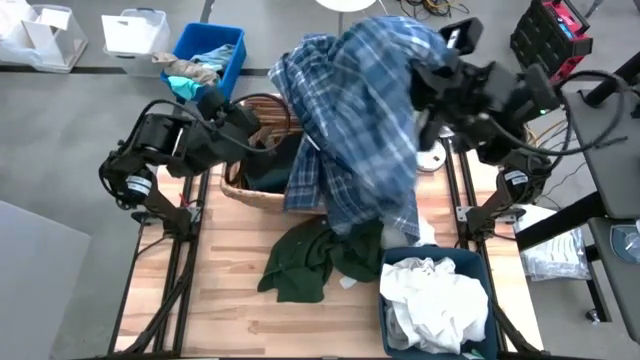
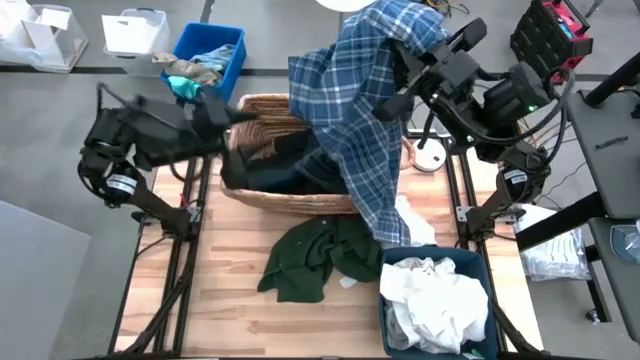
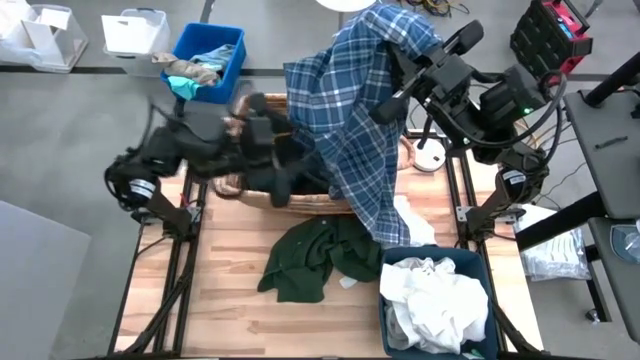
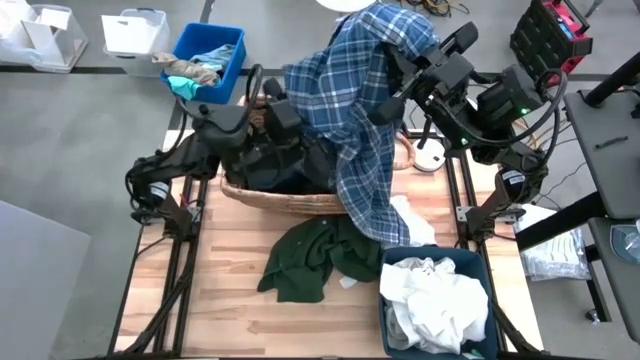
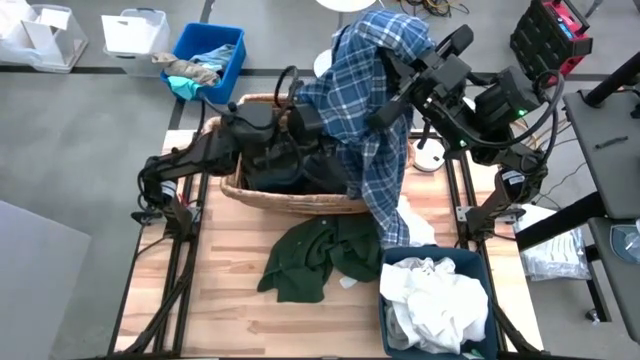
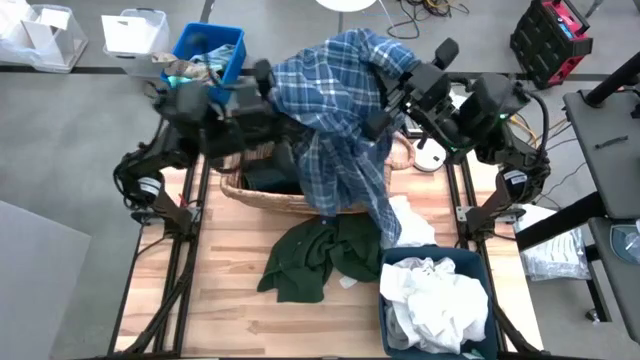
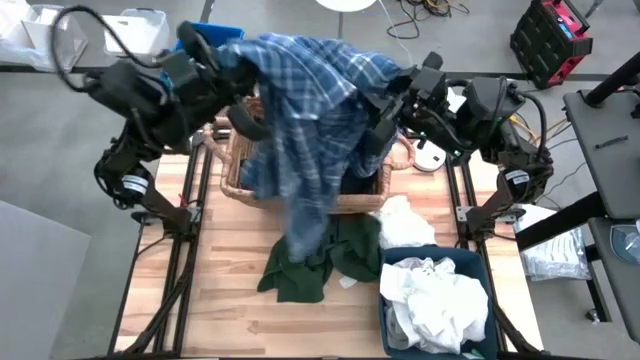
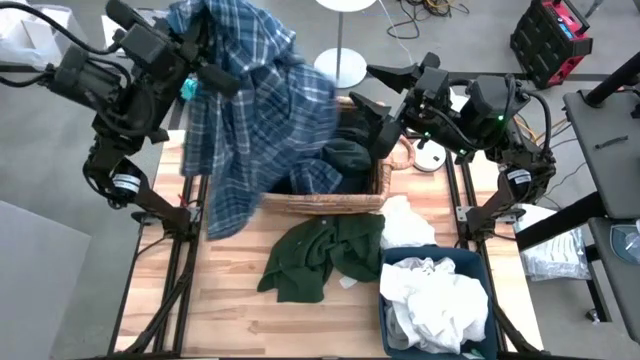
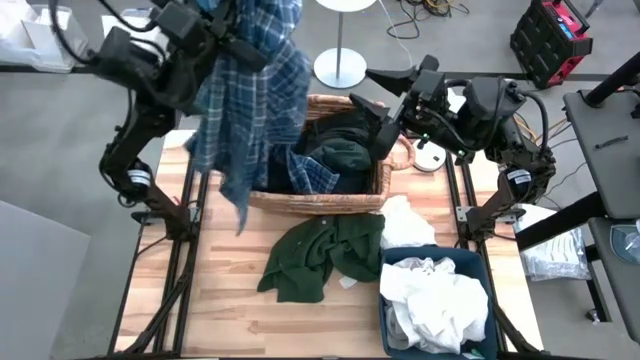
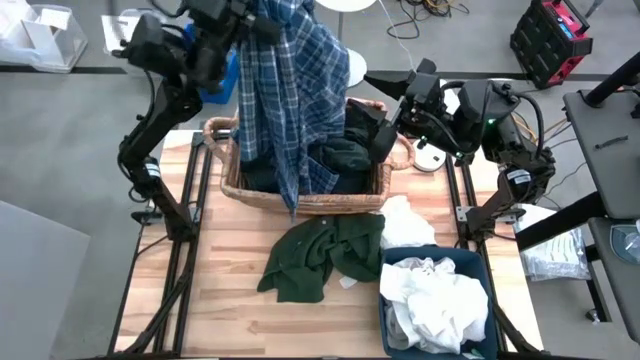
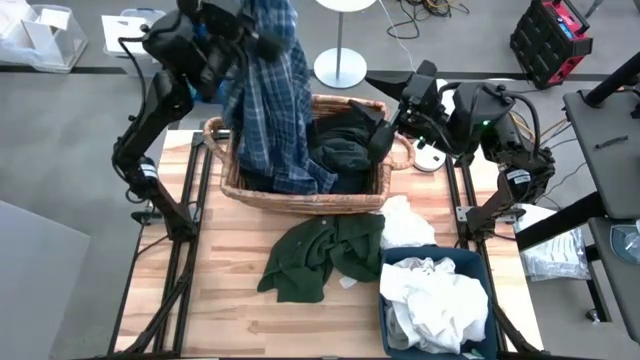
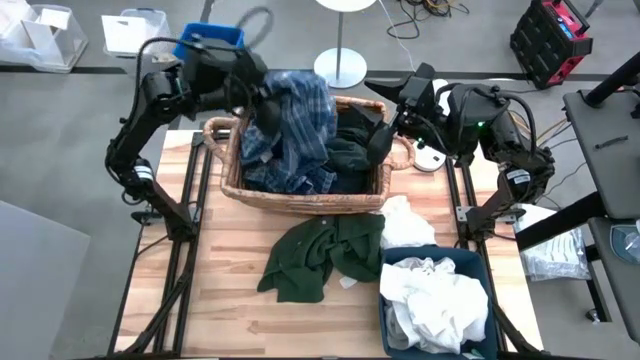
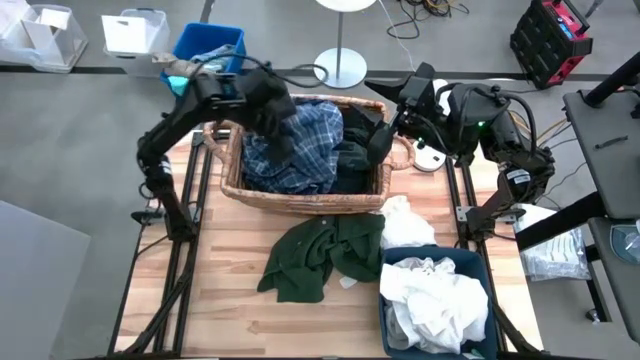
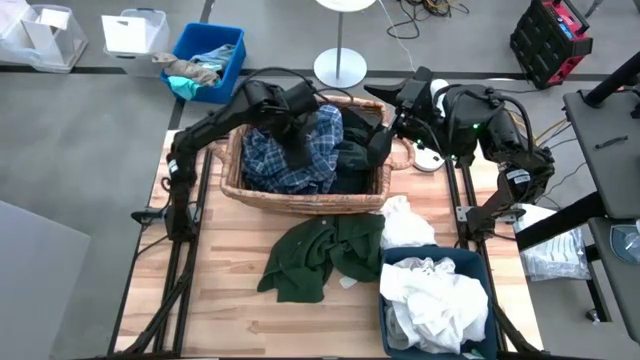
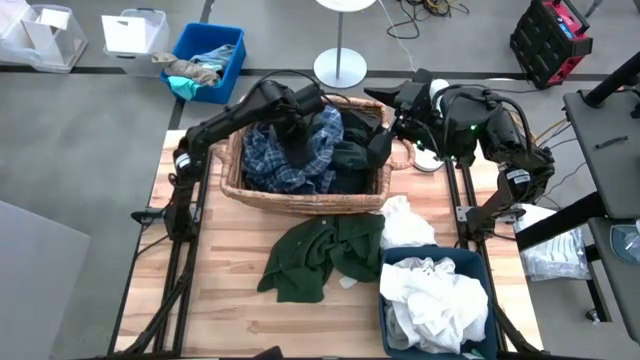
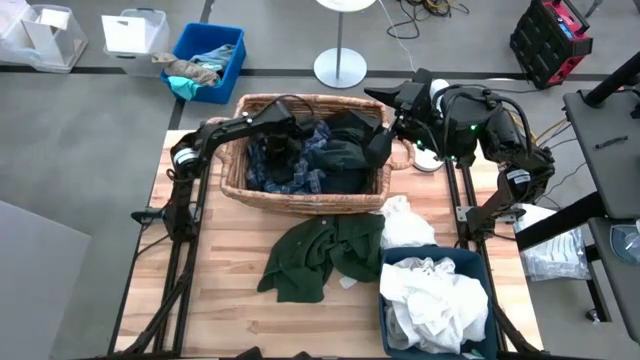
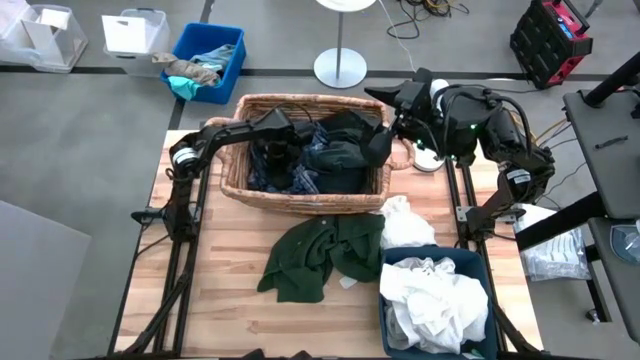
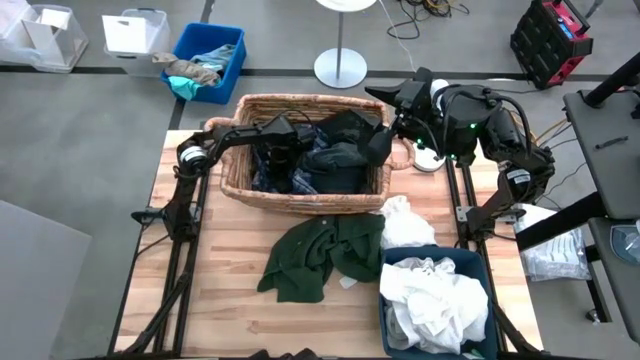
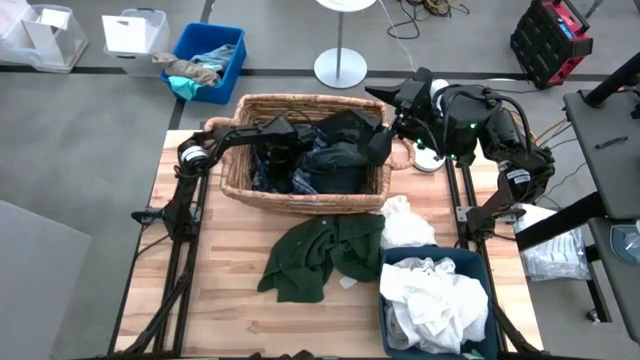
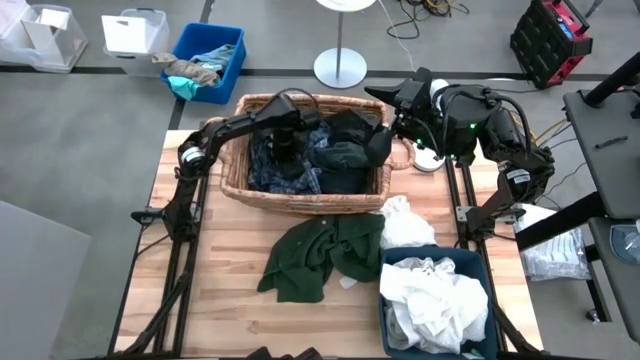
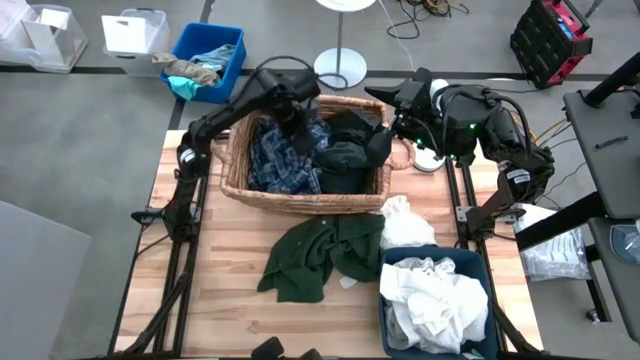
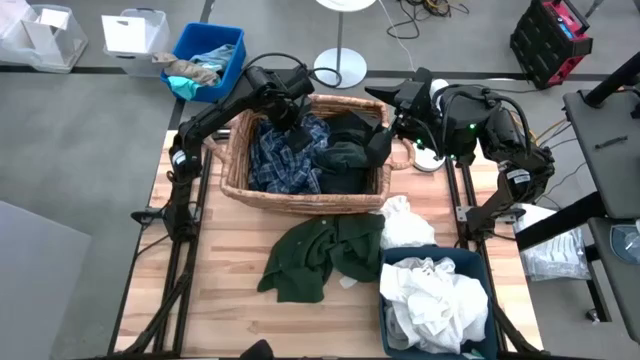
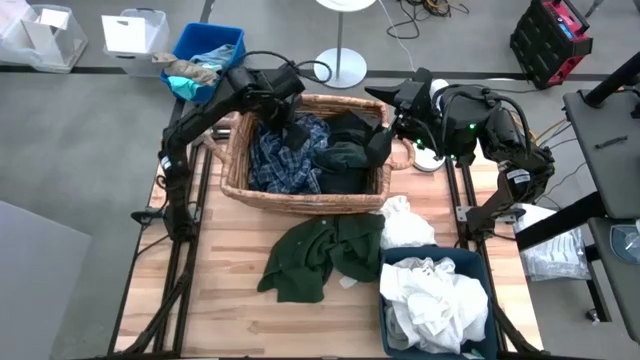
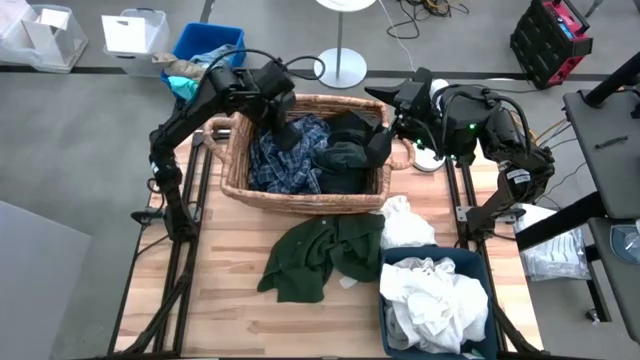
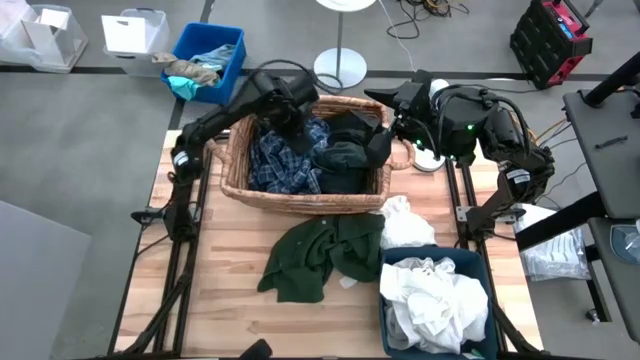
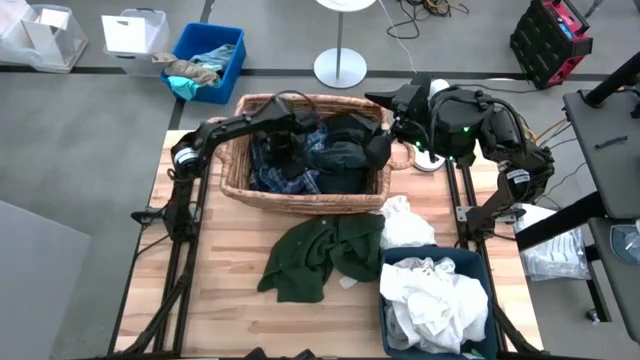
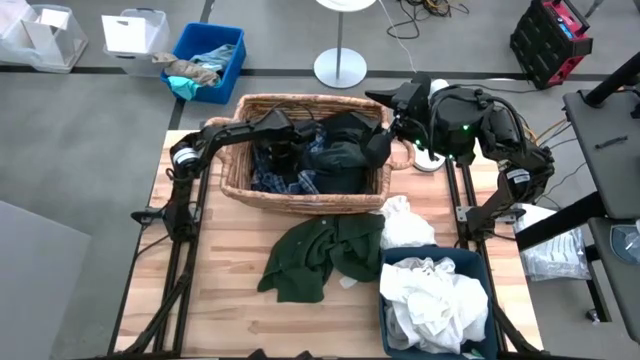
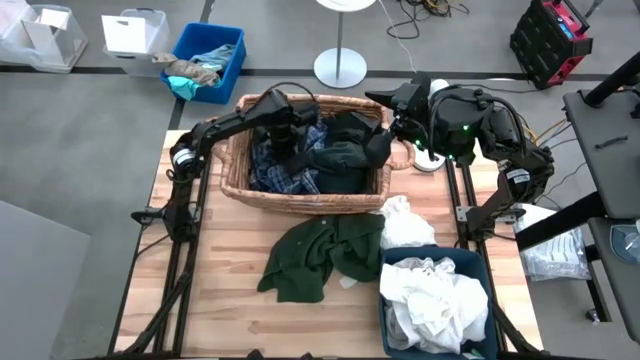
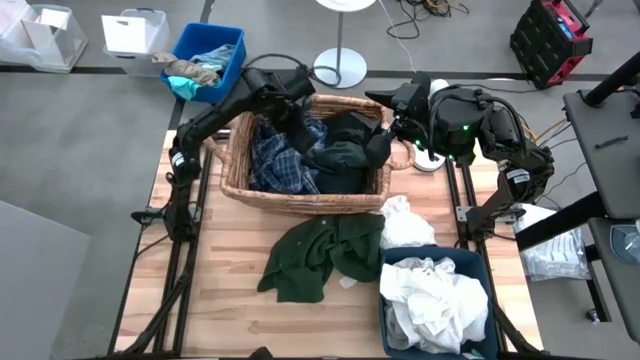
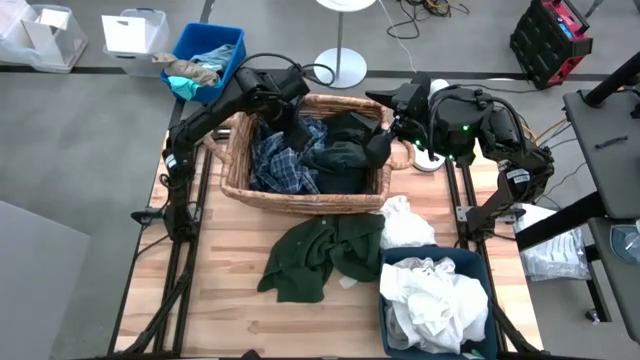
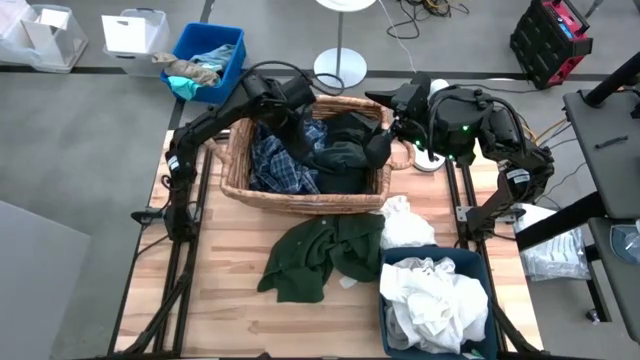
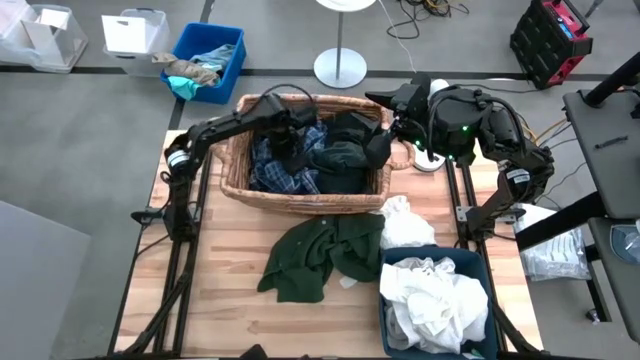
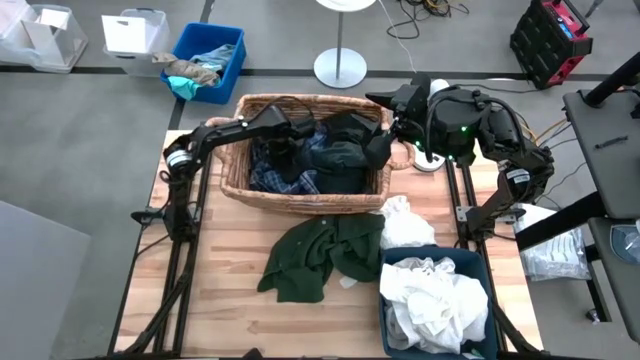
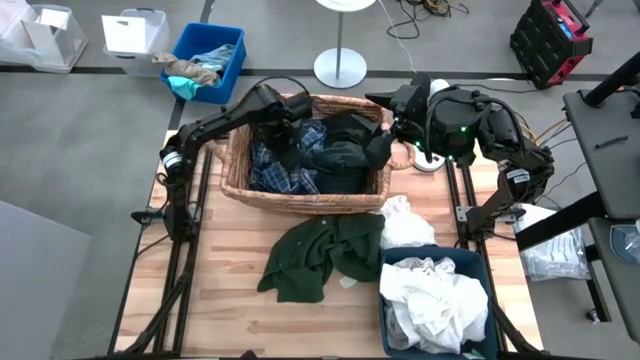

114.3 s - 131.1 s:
Task: Sort clothes
Put the blue checkered polo shirt into the brown laundry basket

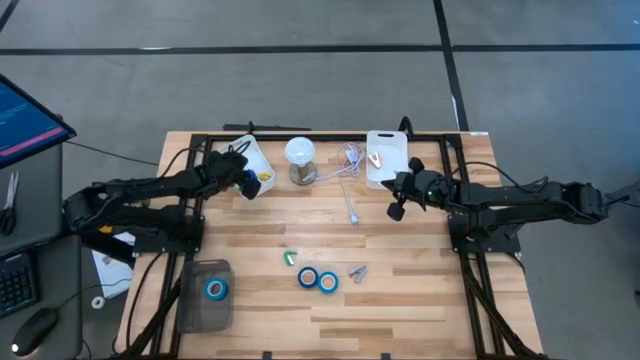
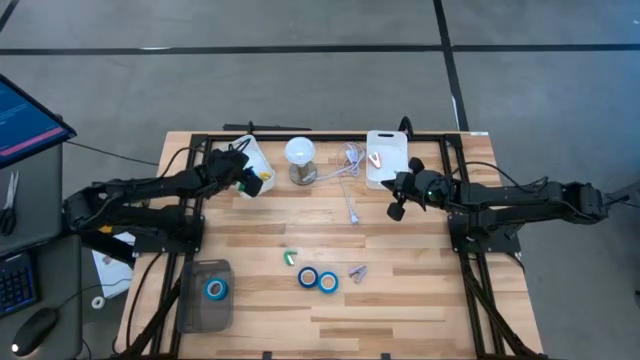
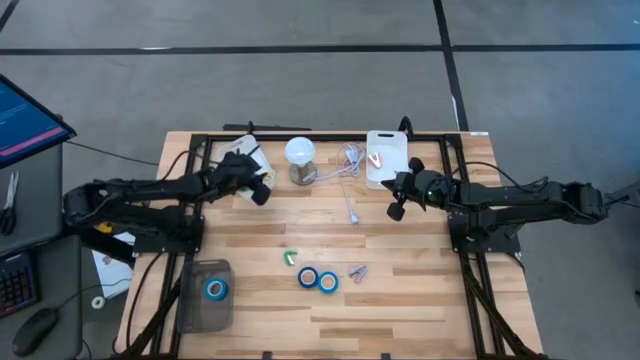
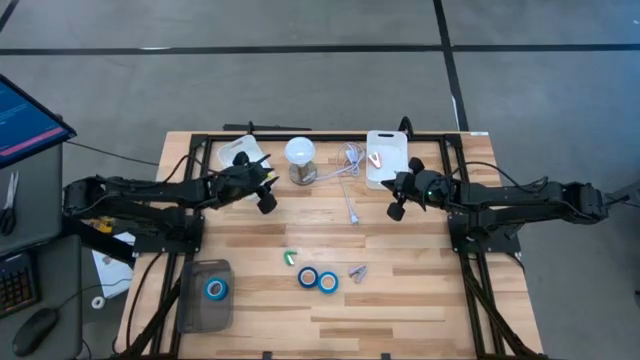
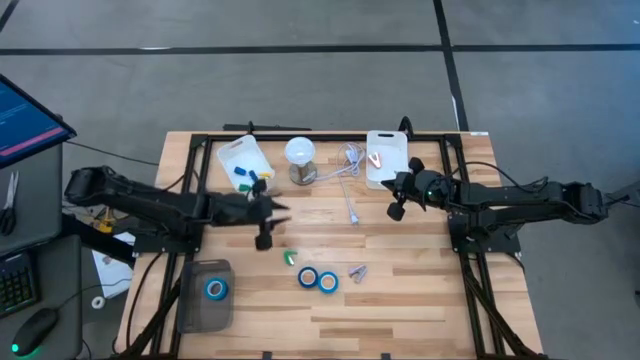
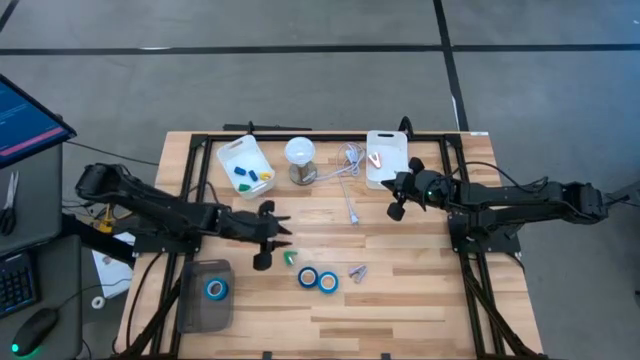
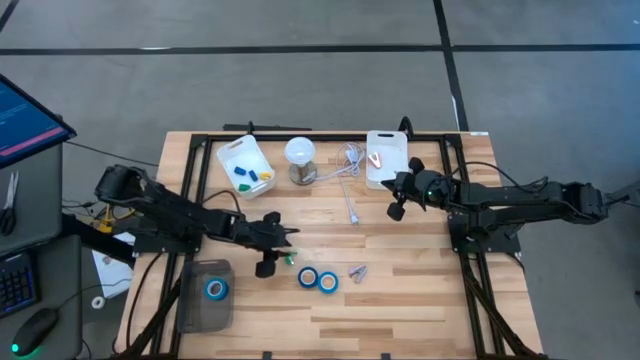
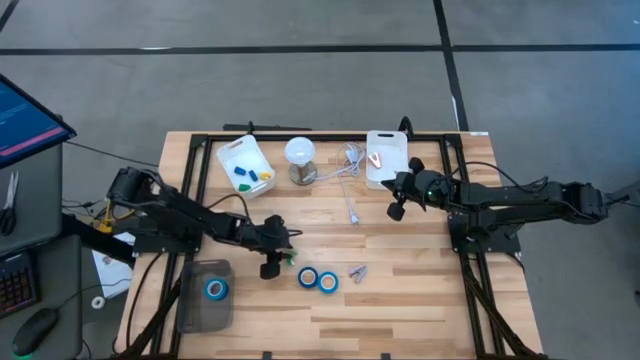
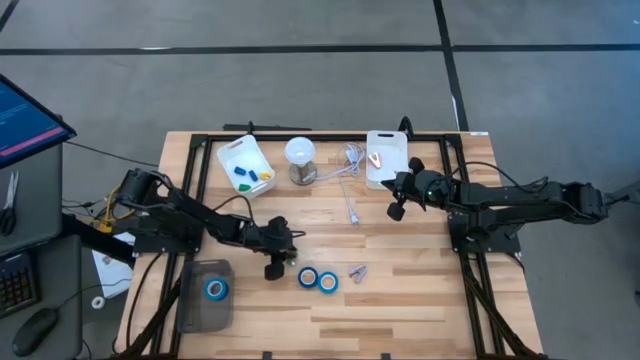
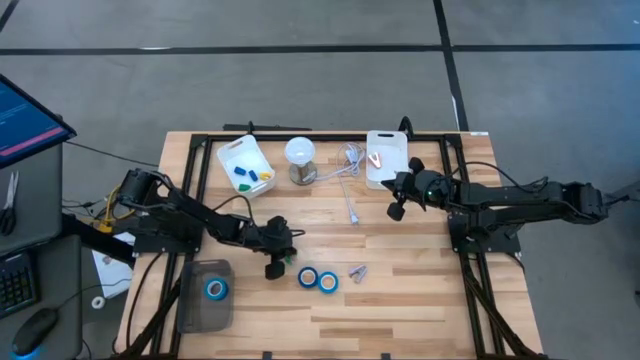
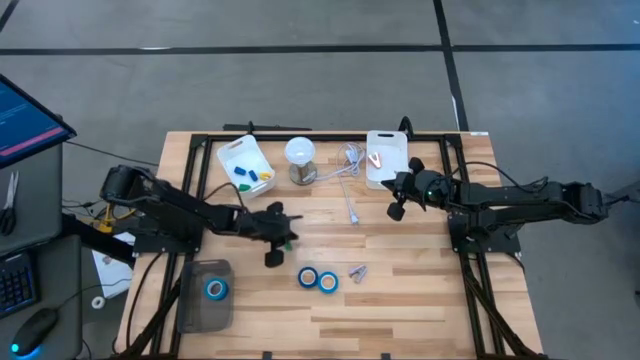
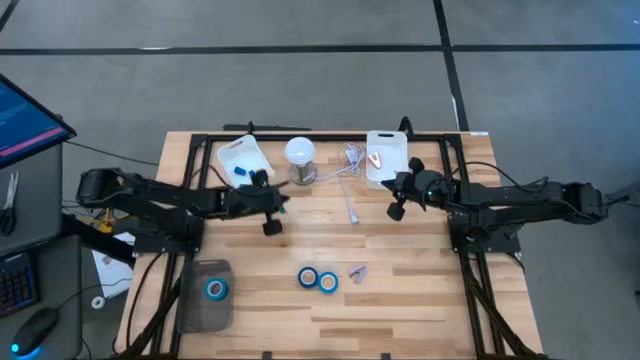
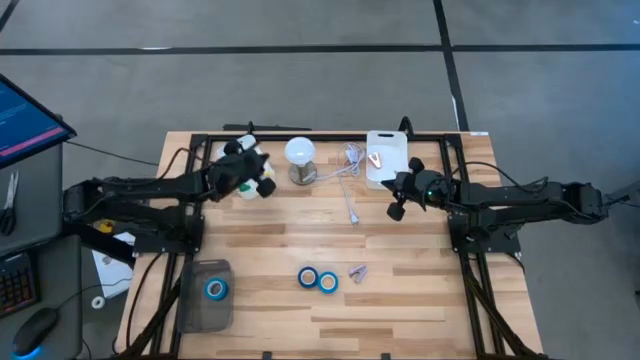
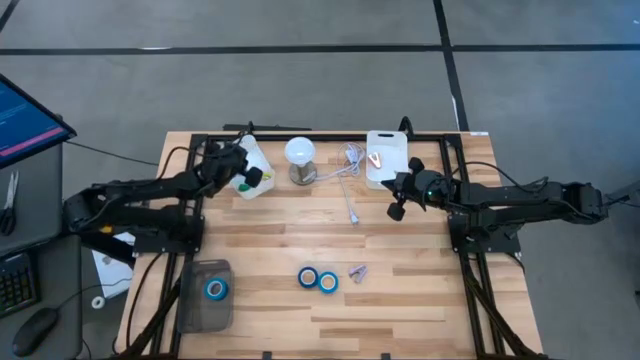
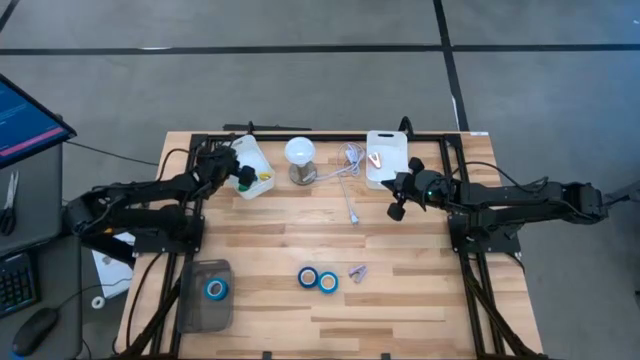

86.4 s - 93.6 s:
Task: Pick and place Stapler, Stapler remover, tape
Put the green stapler into the left white bin
